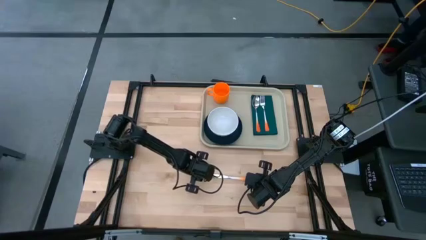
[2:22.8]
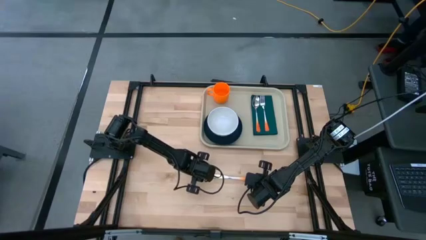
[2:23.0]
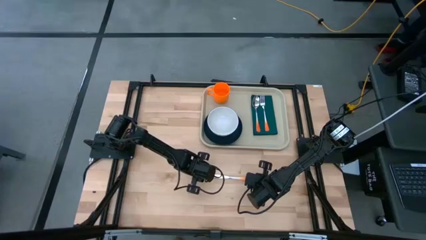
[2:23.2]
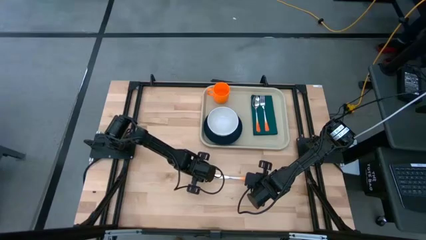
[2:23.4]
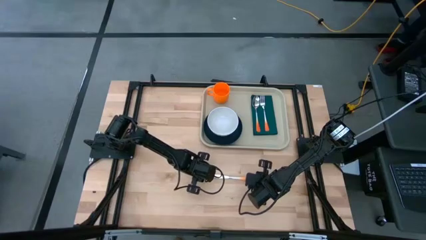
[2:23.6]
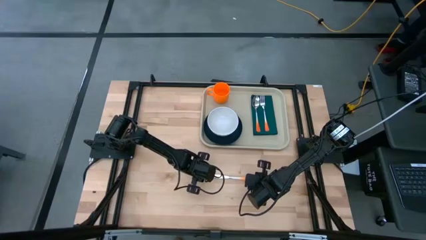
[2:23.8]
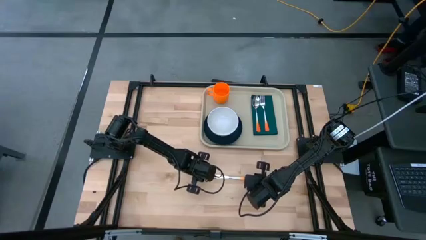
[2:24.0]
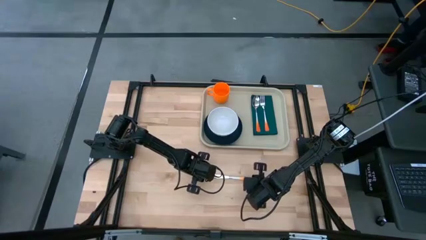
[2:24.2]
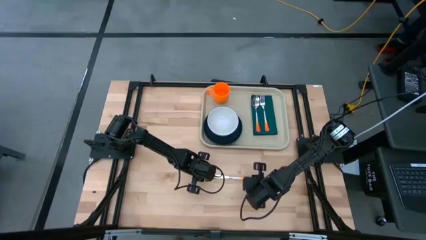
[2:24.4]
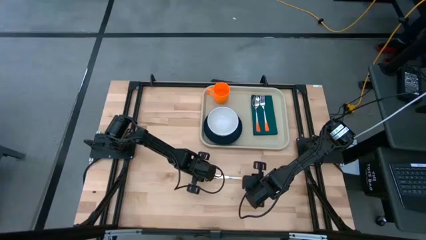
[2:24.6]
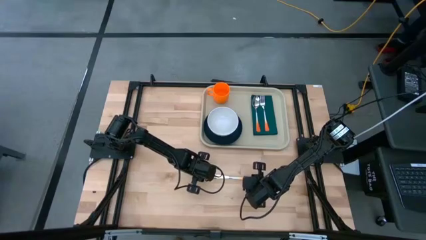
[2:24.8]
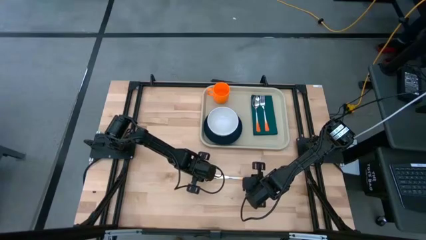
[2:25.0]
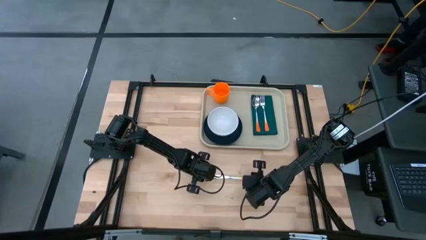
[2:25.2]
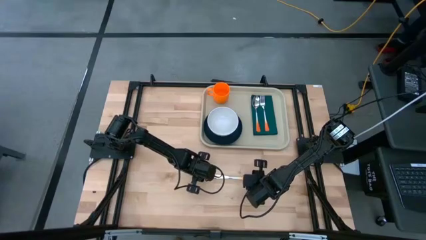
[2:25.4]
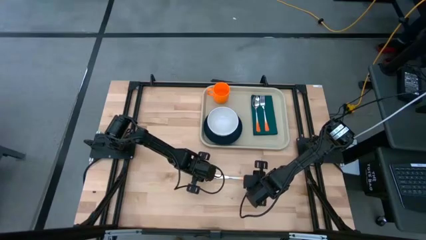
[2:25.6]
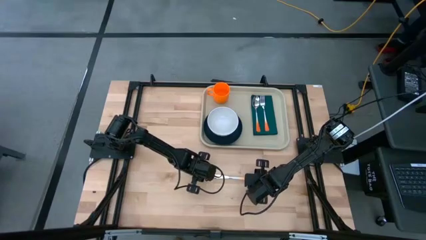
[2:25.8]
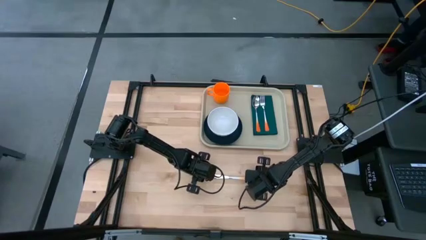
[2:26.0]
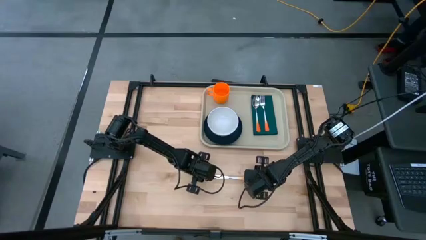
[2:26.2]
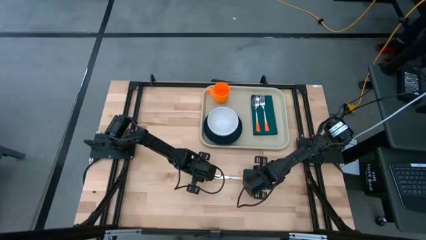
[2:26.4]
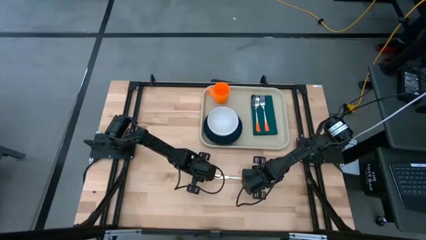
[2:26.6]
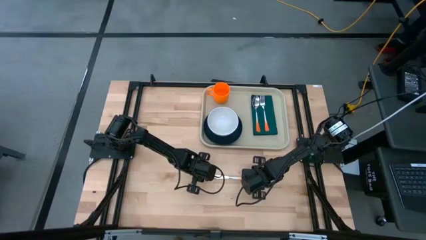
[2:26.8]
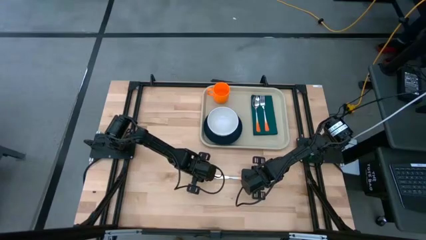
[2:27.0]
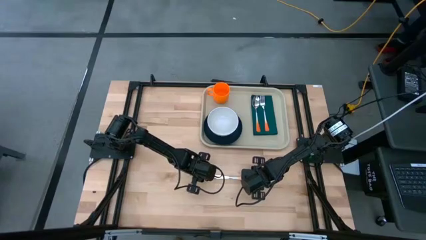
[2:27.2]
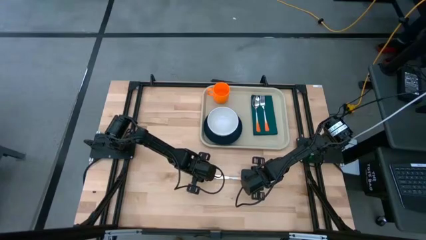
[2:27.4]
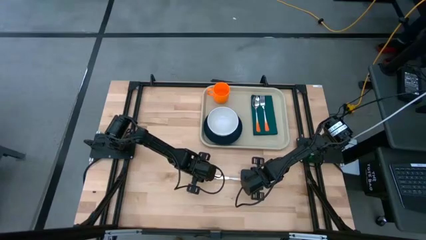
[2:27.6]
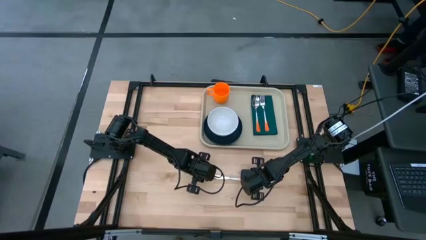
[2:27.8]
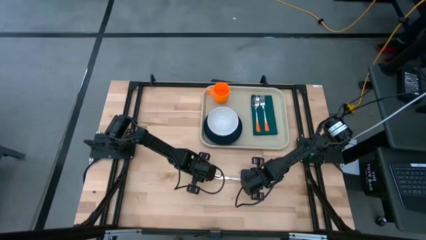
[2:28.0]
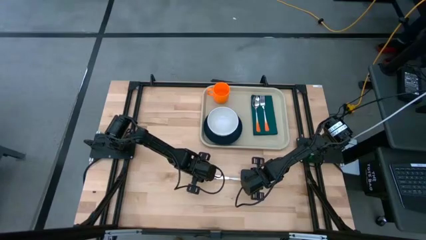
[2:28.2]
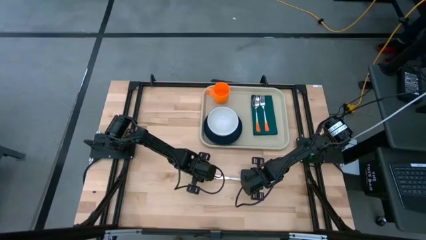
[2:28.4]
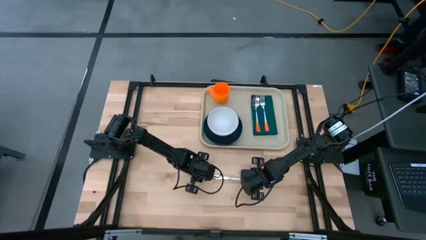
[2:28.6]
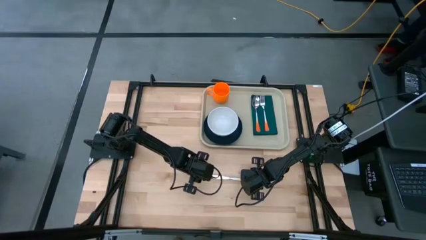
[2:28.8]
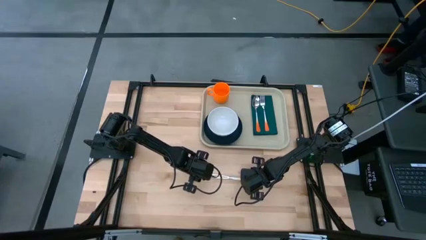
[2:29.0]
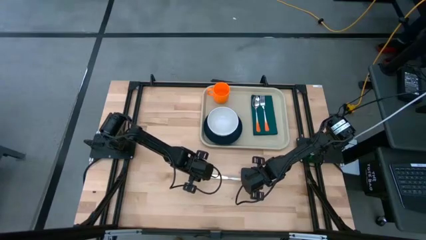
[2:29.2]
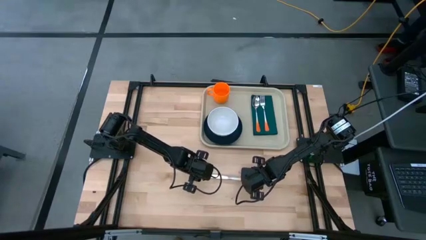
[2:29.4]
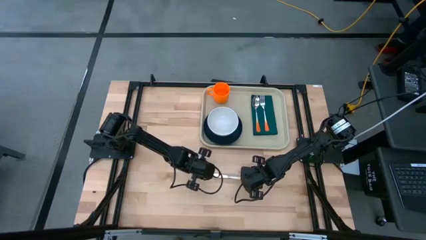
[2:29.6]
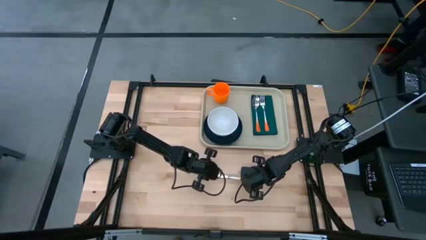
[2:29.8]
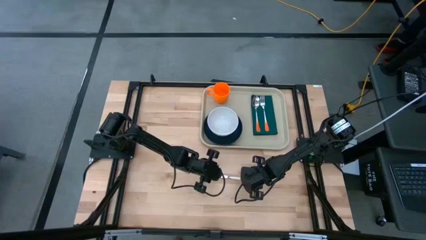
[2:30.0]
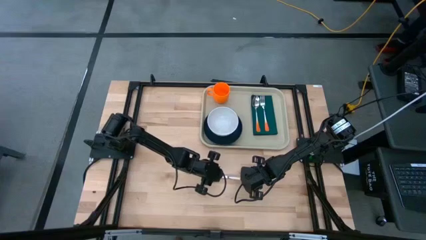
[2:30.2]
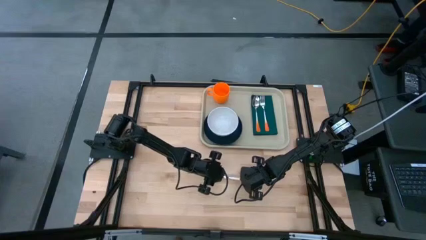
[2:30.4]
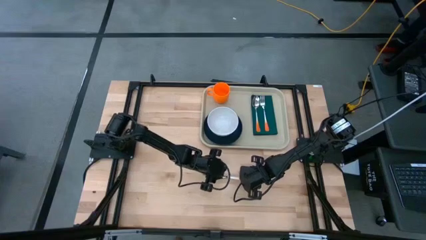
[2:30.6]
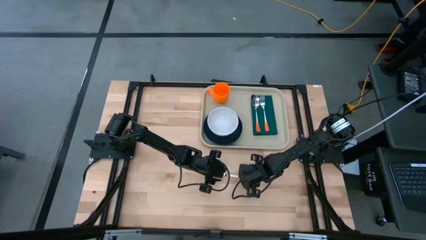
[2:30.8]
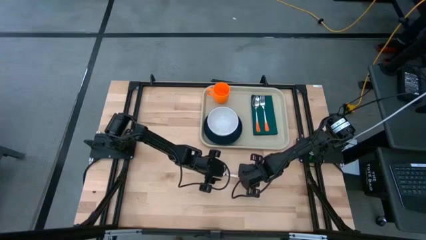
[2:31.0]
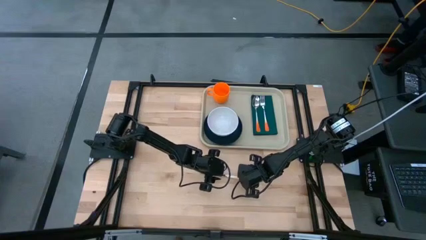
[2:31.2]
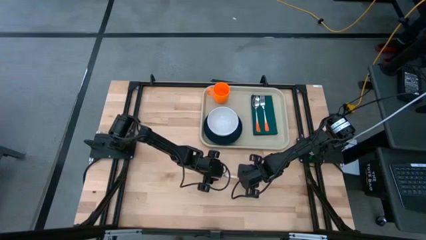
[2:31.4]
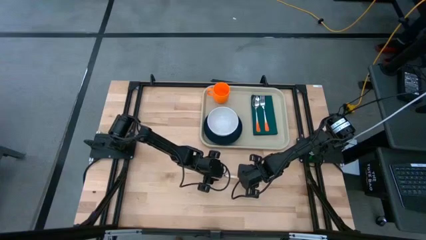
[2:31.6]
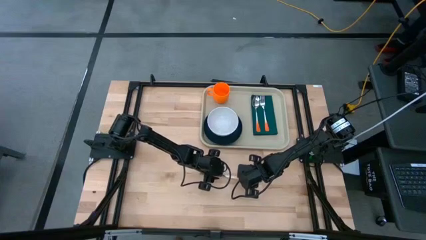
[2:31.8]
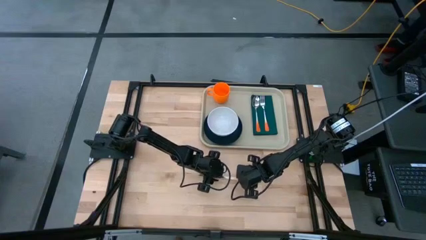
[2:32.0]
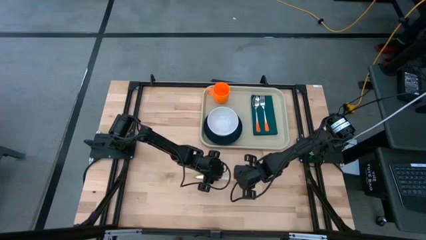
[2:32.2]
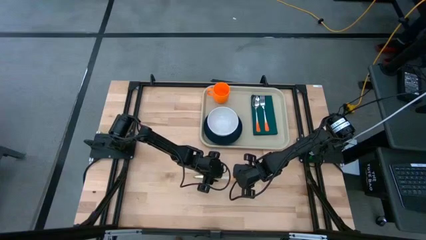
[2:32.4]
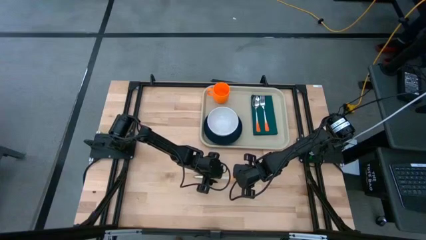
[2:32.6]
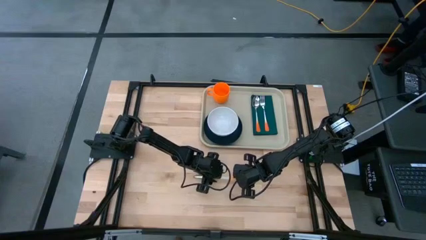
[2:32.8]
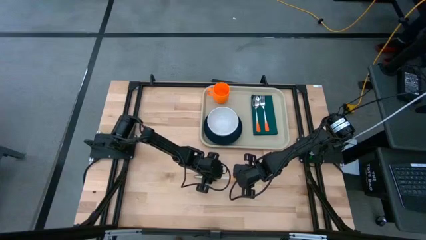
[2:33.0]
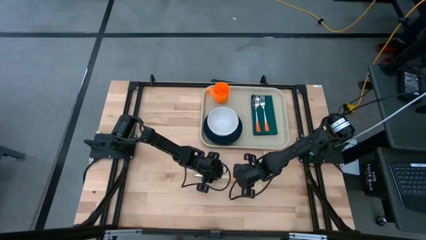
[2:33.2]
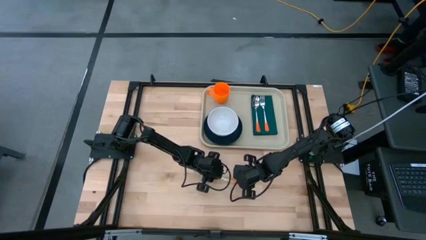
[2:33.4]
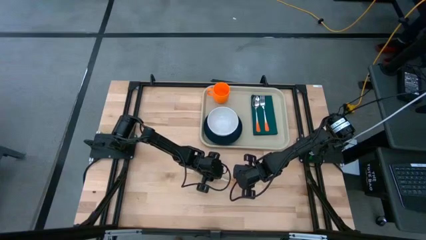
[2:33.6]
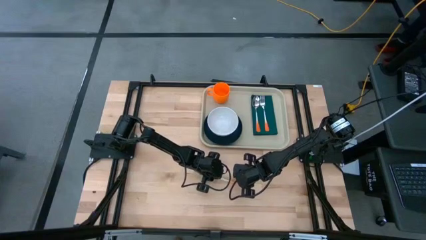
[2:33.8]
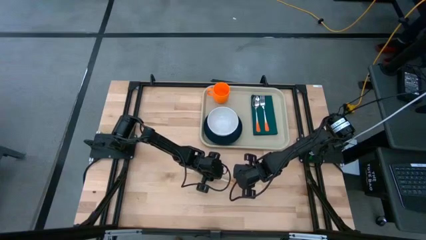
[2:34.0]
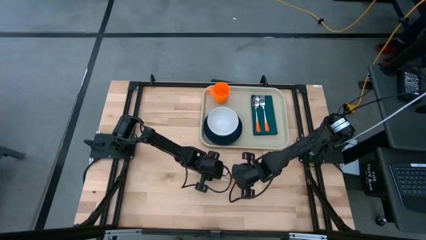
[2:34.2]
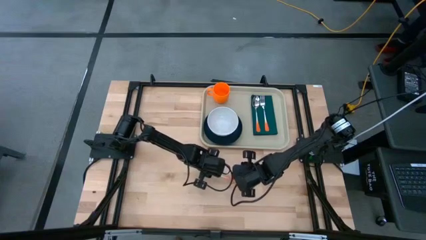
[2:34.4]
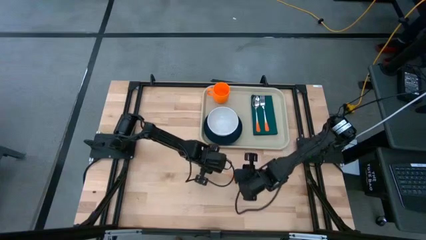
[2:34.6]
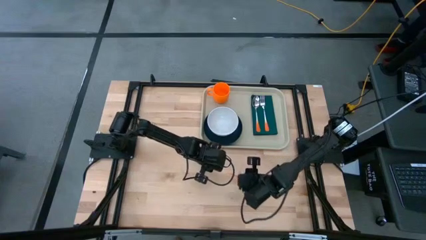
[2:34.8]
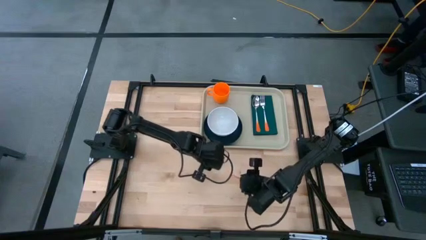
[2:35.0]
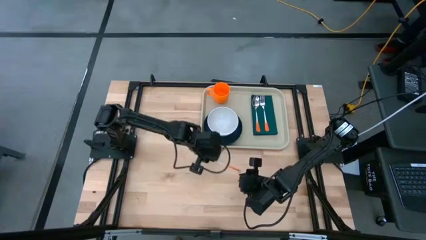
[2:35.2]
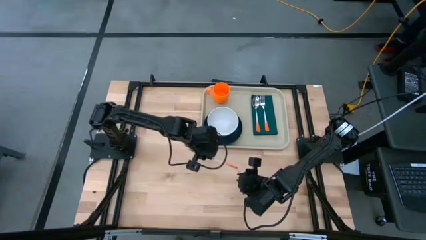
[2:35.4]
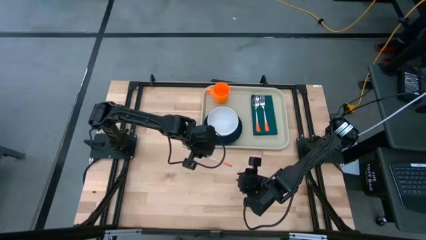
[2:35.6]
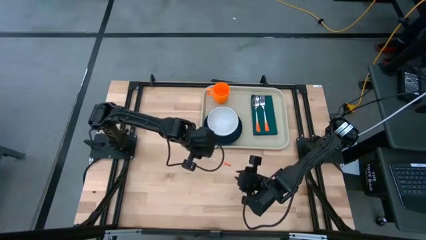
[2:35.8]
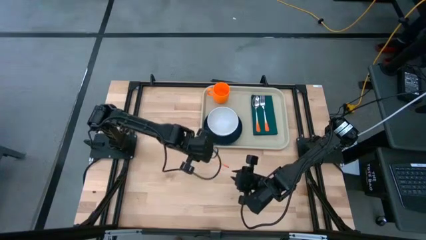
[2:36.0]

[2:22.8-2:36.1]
Task: Set up tray
Put the orange knife to the right of the orange fork on the serving tray

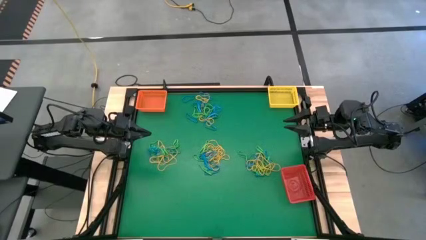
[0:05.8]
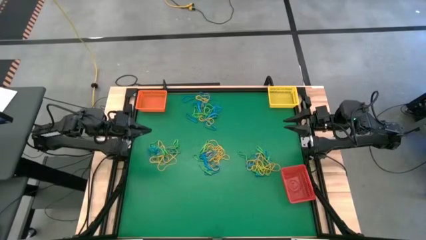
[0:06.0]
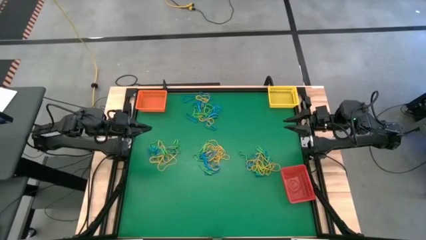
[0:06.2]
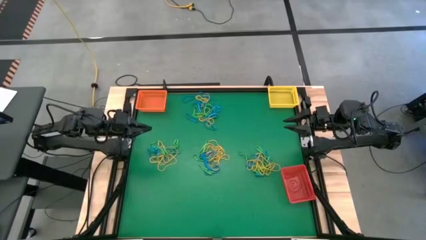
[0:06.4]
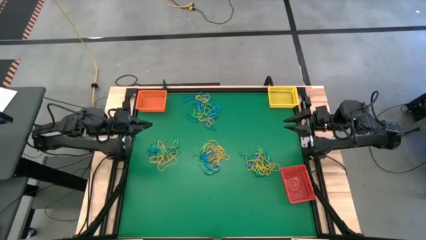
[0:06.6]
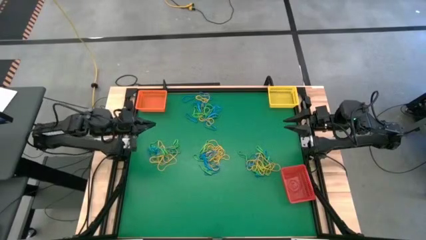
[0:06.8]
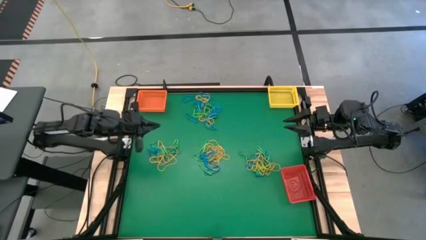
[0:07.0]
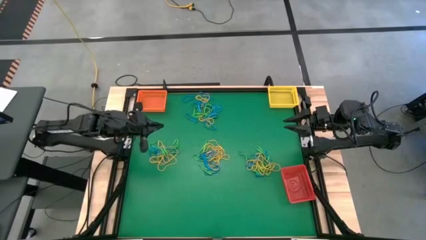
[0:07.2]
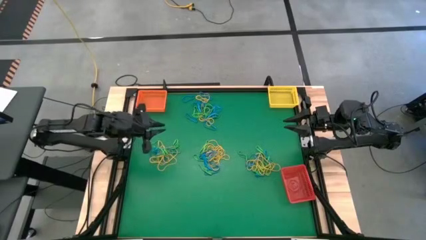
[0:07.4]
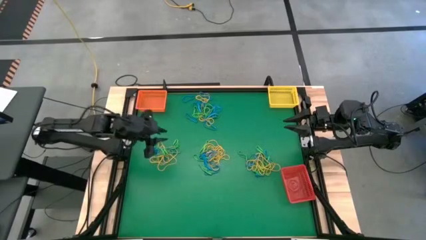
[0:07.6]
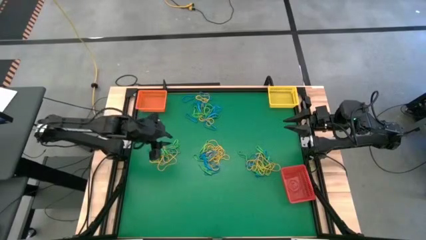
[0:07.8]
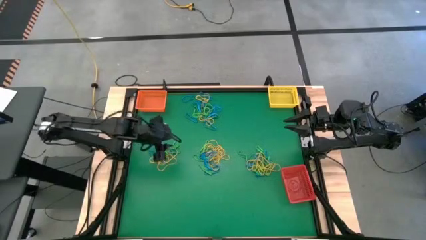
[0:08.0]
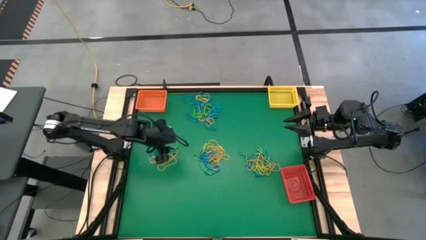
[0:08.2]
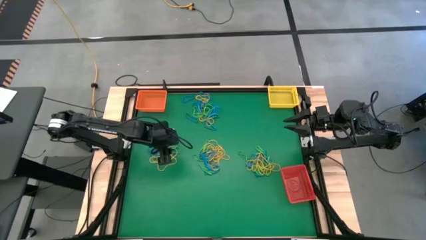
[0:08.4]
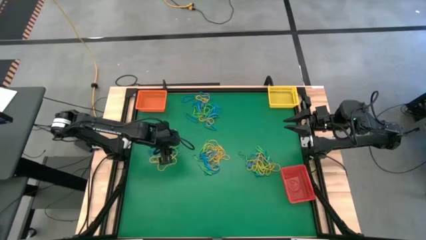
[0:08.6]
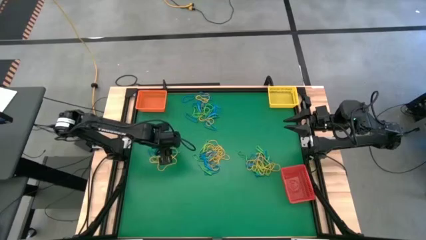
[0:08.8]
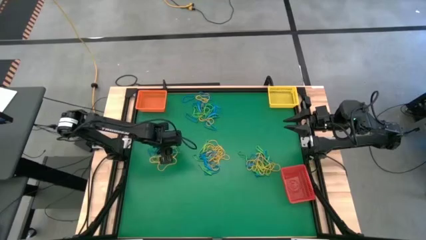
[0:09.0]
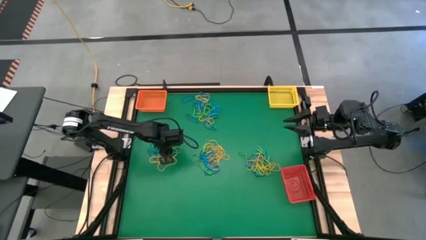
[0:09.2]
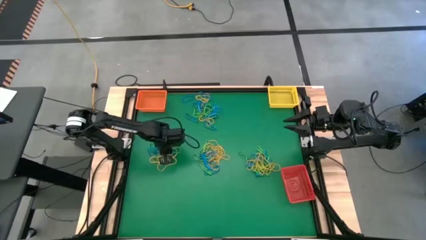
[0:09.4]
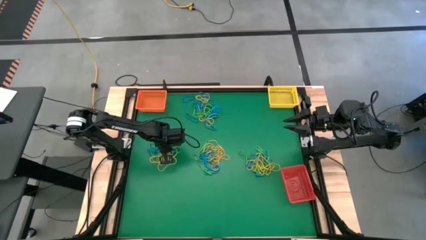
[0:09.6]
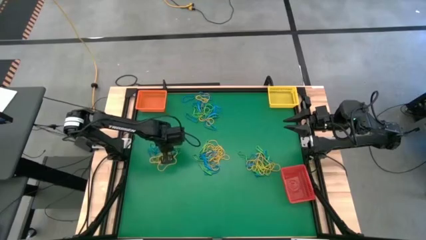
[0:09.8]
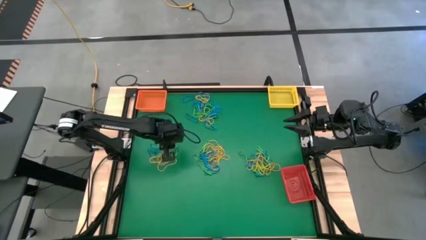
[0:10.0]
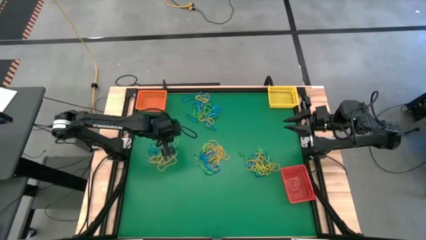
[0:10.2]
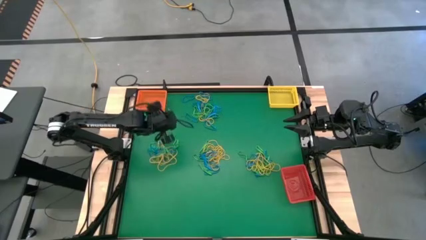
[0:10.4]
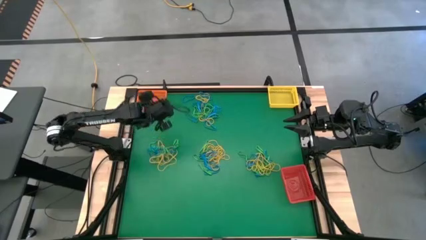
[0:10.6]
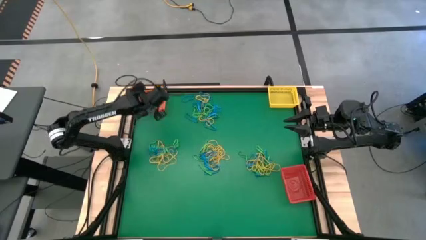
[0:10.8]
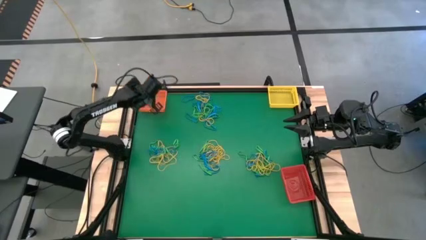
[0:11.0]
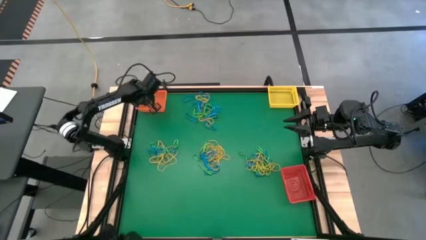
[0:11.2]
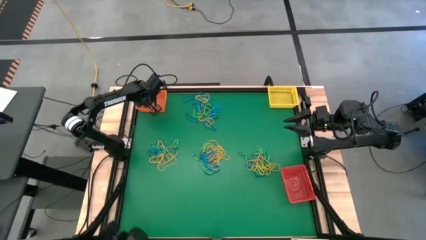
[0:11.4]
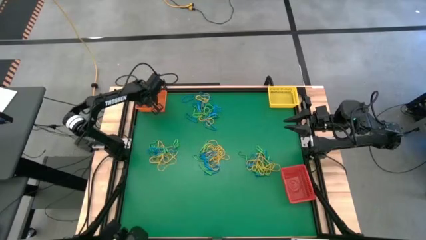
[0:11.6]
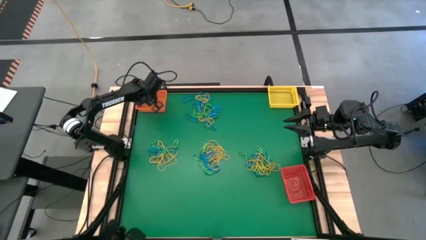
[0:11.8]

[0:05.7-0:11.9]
Task: Sort rubber bands into baskets
Put the green rubber band into the orange bin
